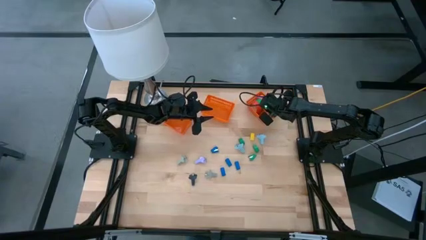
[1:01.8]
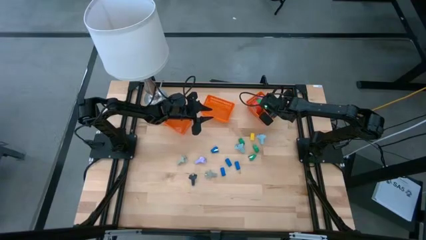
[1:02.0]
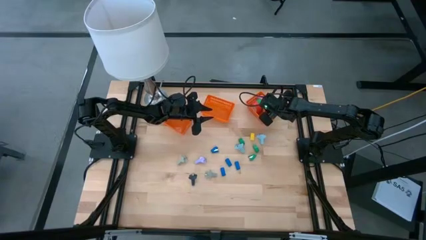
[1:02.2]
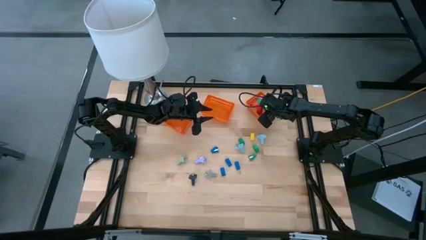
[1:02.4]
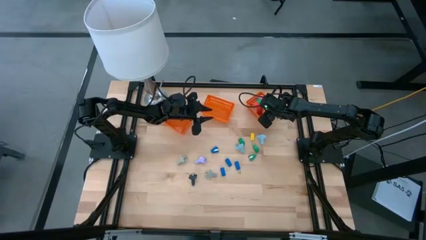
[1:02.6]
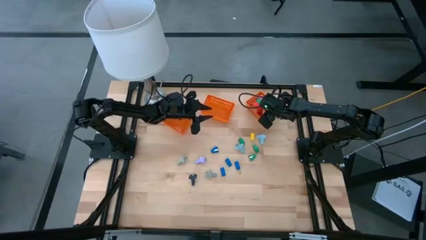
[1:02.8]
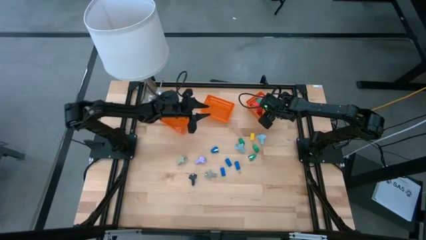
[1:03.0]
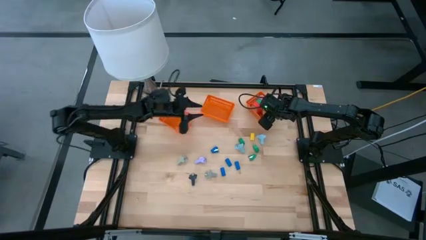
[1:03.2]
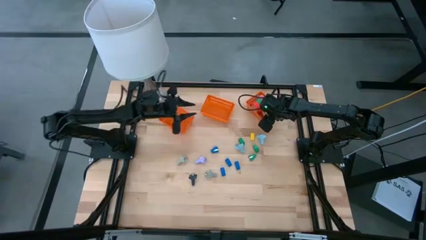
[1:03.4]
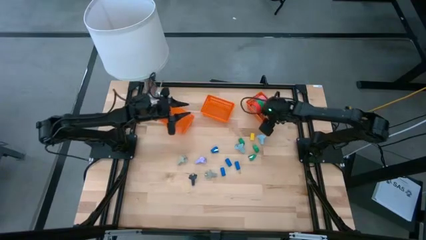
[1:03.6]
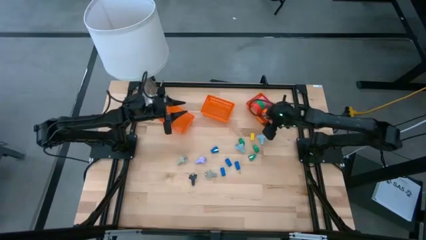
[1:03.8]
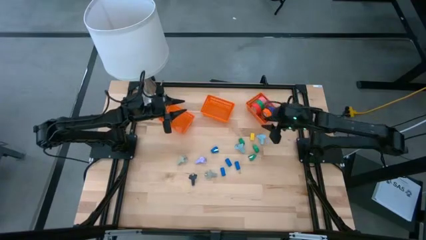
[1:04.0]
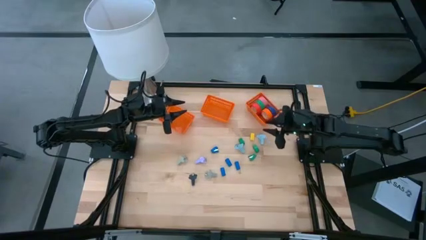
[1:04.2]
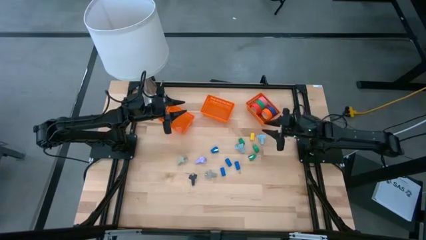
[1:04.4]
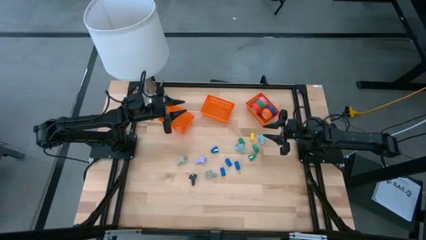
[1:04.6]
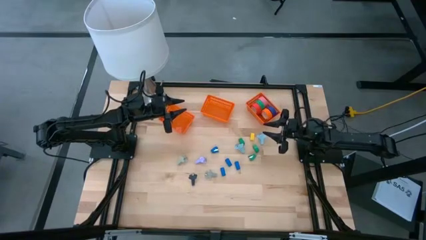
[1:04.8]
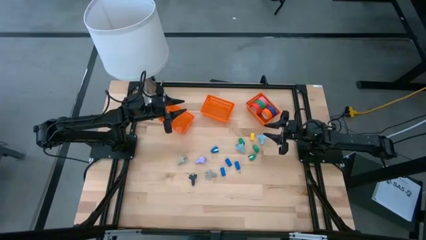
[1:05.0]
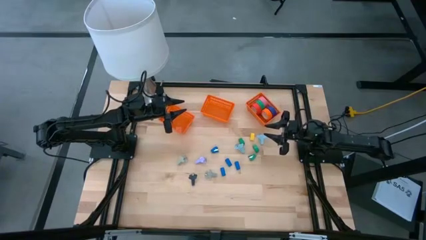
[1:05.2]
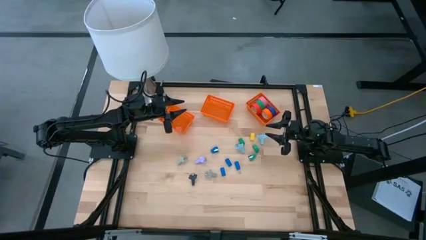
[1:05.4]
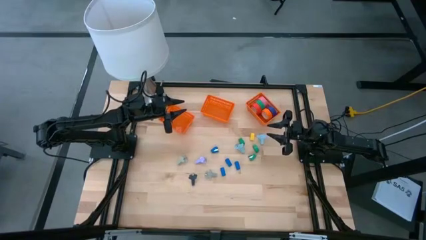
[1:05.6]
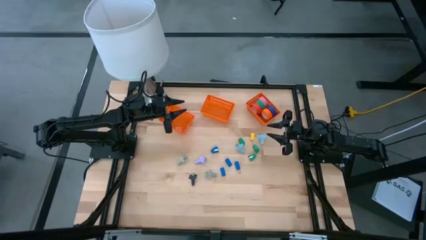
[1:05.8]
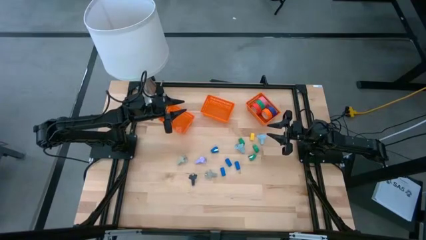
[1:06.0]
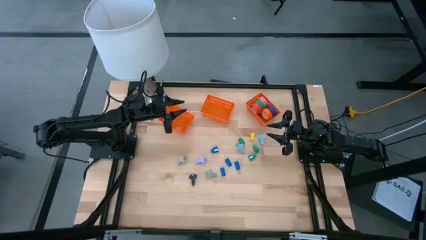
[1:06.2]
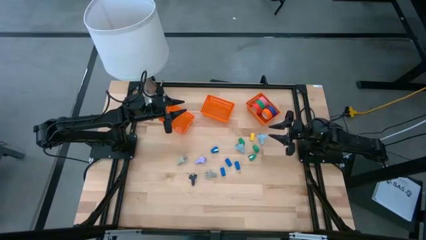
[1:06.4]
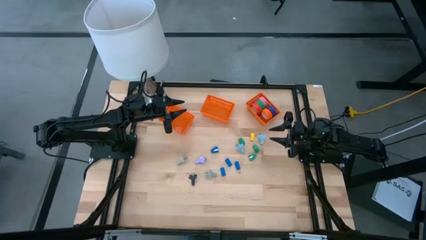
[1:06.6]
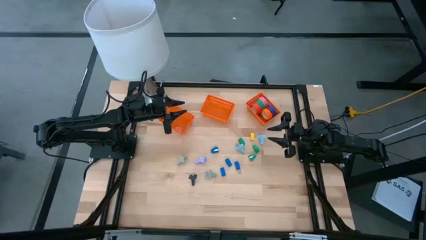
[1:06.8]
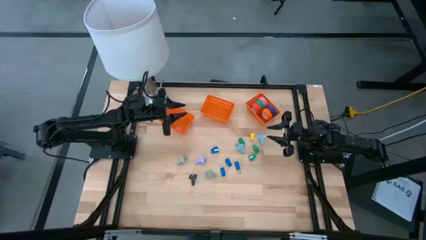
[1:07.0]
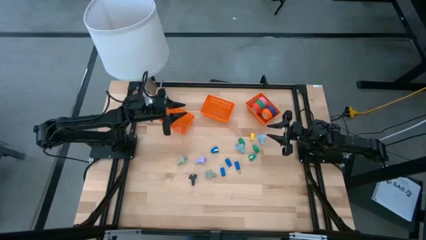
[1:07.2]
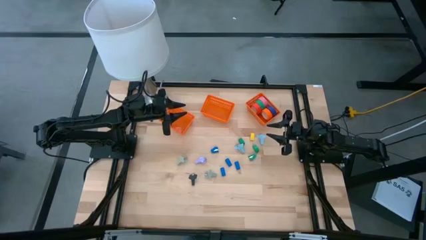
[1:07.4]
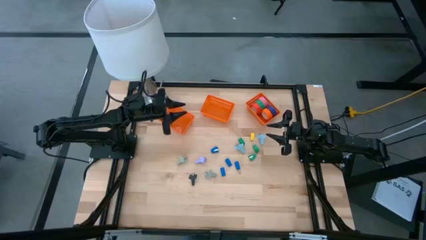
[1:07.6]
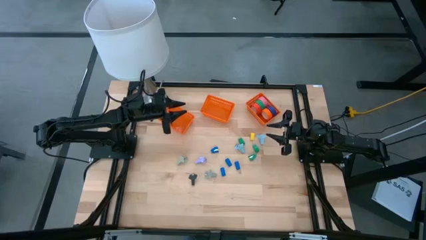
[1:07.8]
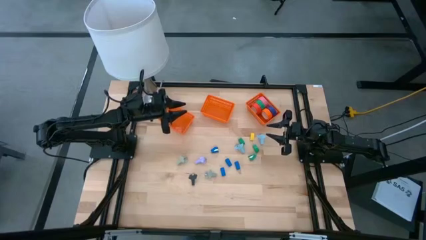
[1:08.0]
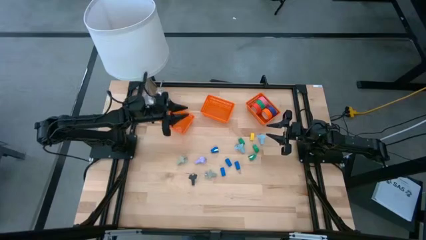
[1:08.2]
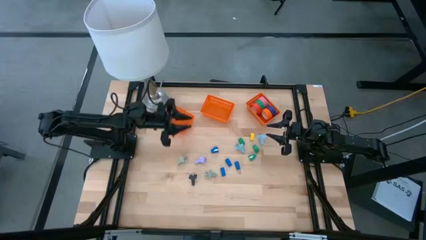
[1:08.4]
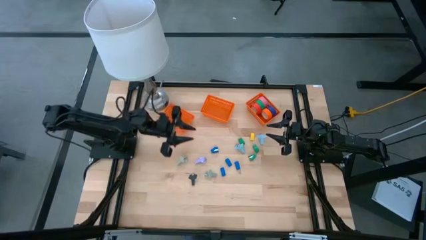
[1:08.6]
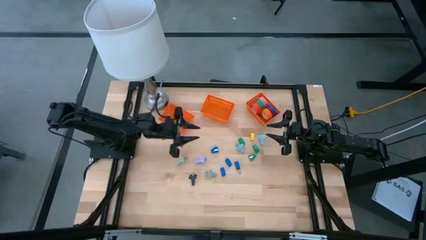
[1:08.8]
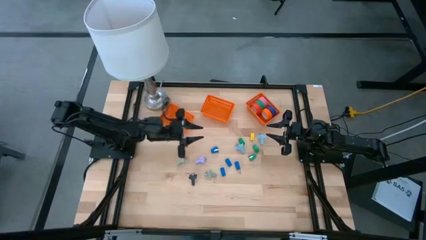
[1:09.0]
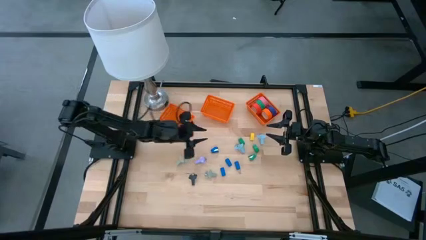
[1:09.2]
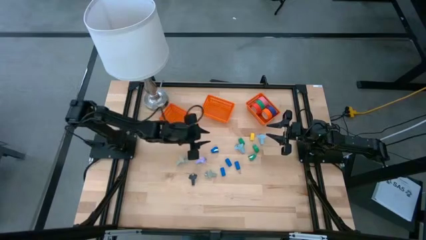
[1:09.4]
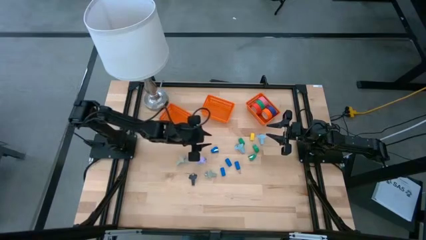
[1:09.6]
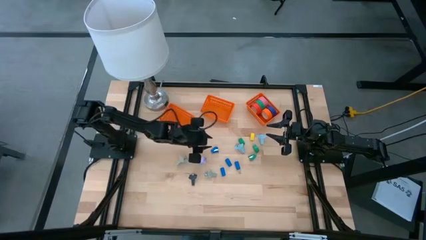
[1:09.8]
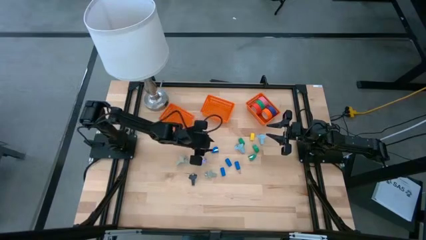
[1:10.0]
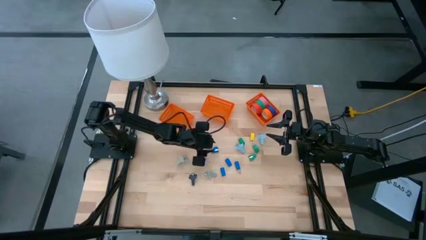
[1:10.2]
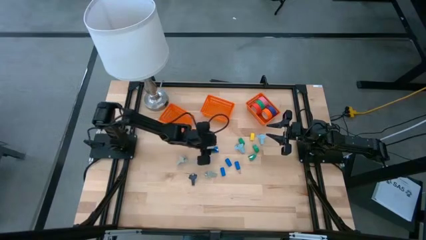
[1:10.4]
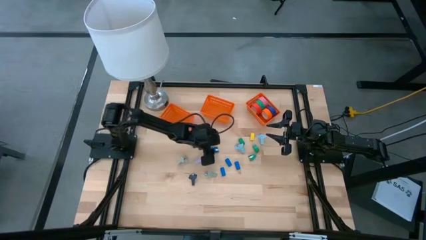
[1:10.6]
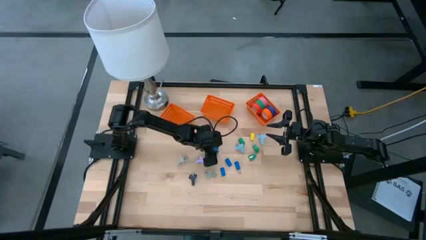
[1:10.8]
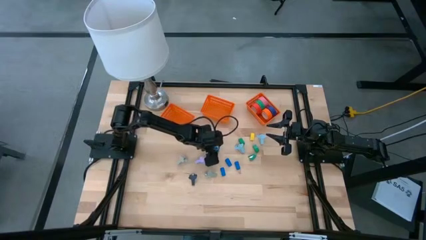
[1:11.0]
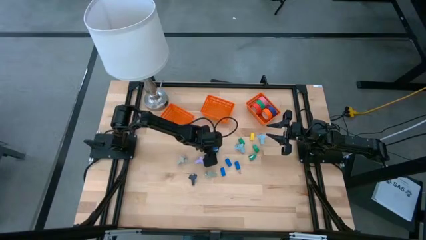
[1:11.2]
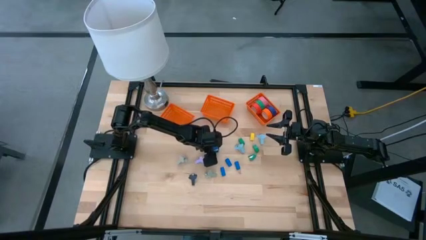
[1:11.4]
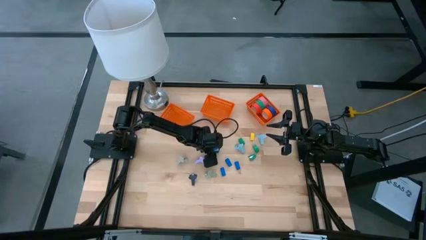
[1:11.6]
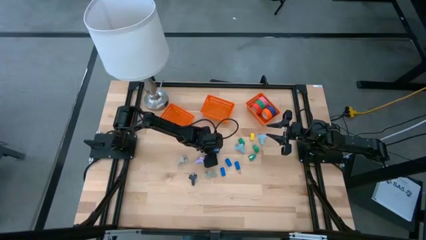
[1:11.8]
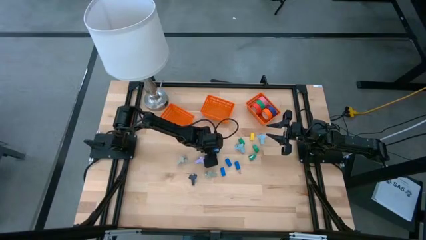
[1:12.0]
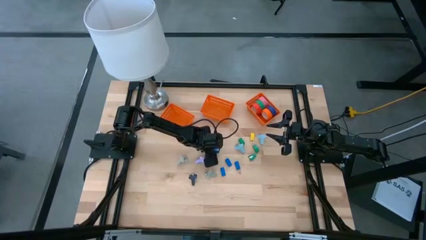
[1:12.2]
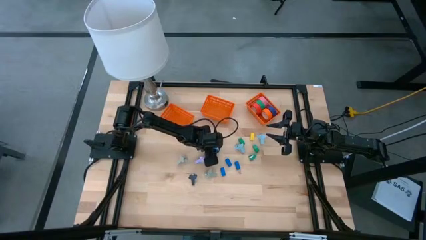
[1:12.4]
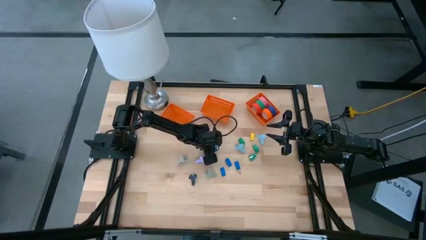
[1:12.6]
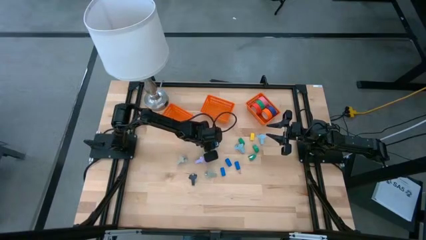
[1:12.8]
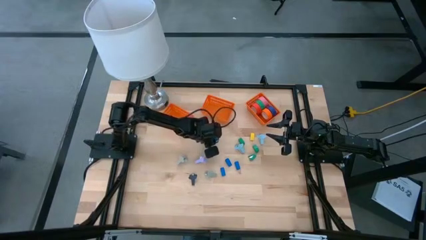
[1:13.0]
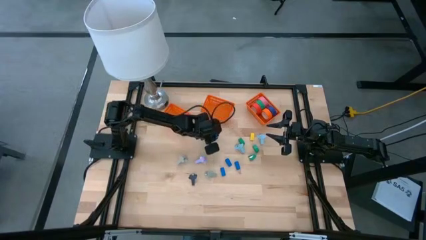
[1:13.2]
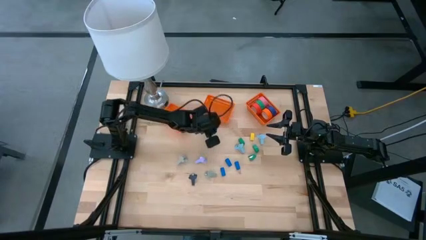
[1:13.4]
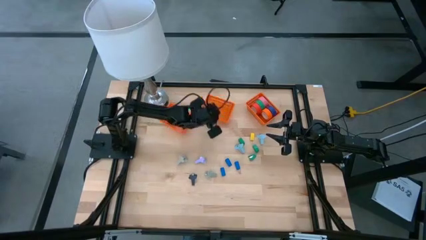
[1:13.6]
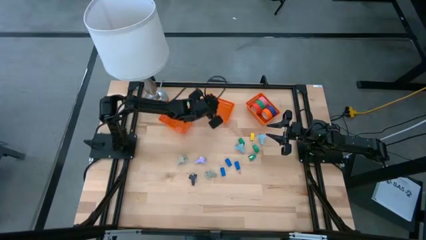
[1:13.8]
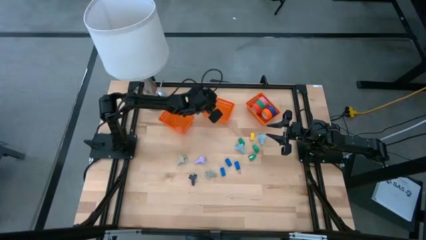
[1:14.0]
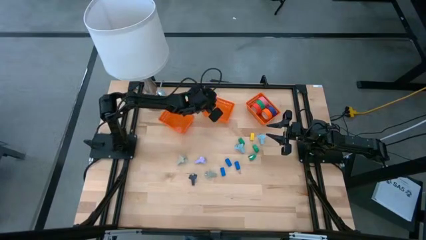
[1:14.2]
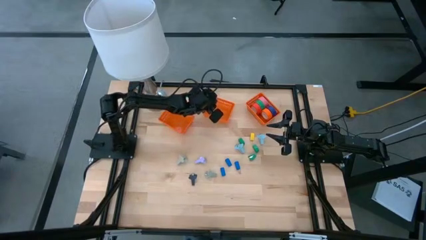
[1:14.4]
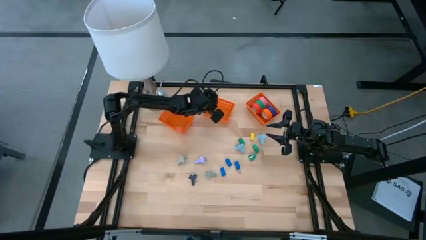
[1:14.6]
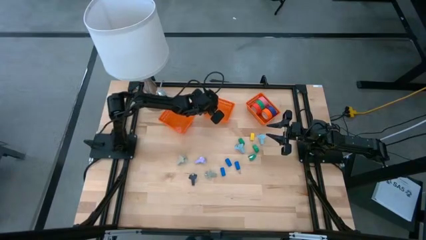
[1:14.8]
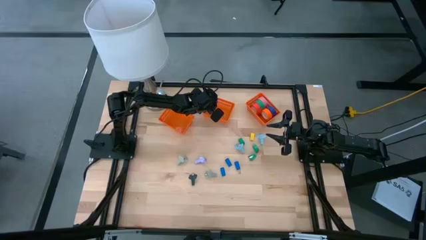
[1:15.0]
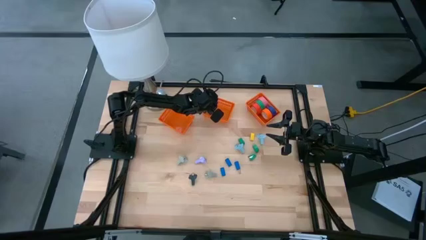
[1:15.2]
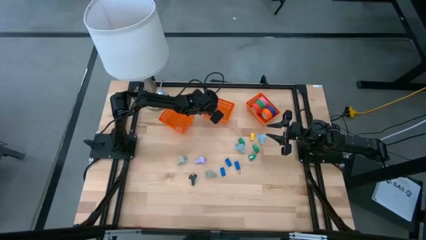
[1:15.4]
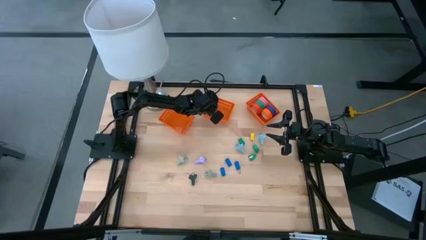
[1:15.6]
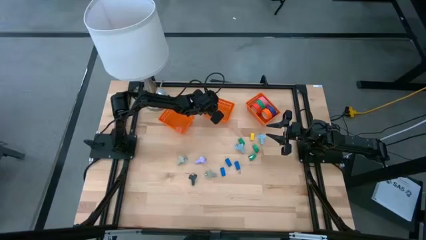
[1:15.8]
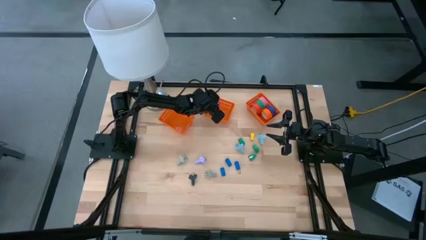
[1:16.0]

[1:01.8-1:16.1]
Task: Pick and place Stapler, Stapler remover, tape
Put the blue stapler into the middle orange bin
